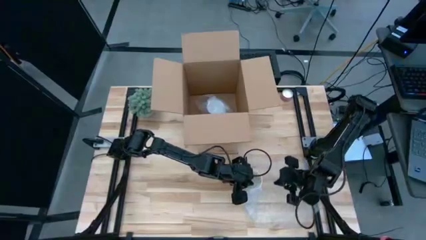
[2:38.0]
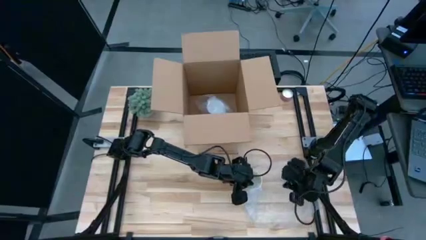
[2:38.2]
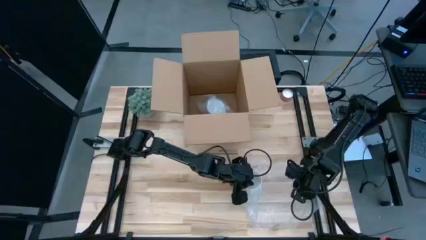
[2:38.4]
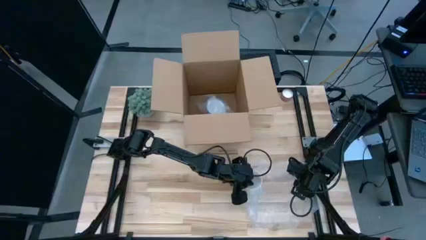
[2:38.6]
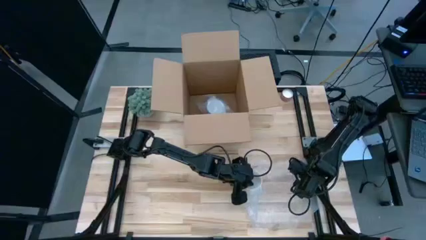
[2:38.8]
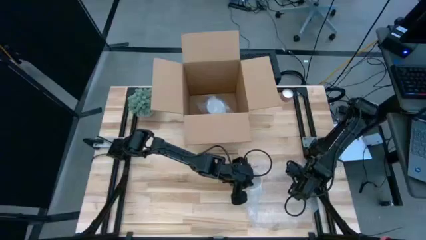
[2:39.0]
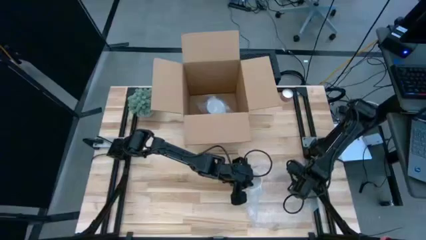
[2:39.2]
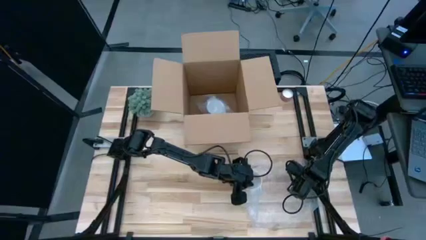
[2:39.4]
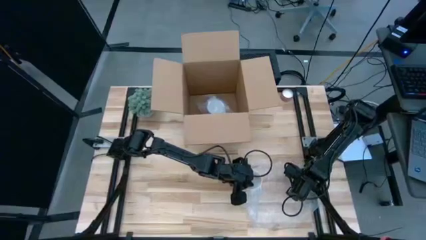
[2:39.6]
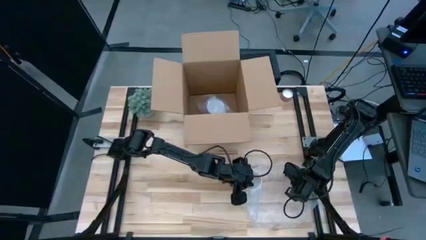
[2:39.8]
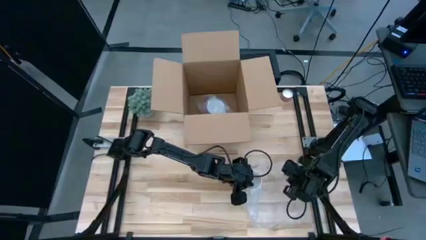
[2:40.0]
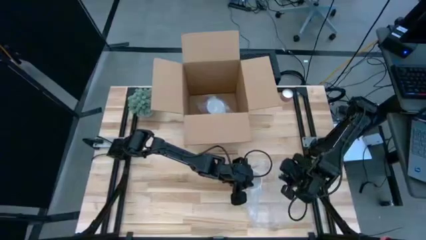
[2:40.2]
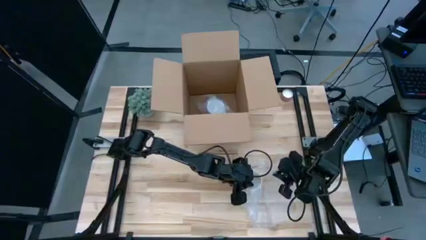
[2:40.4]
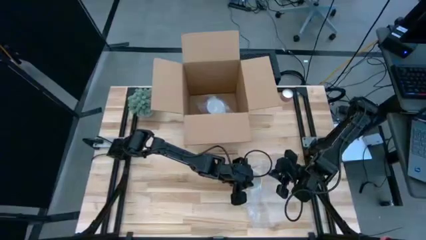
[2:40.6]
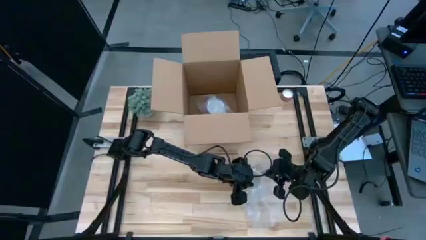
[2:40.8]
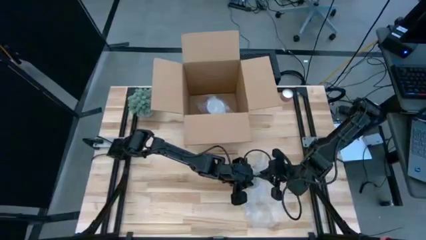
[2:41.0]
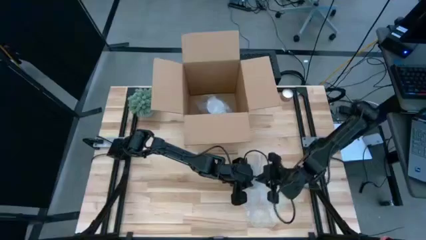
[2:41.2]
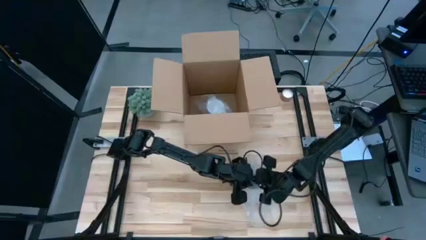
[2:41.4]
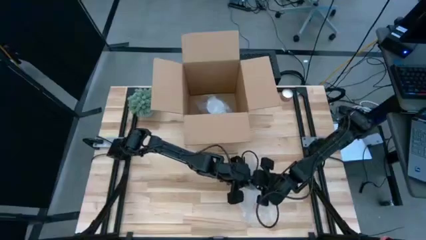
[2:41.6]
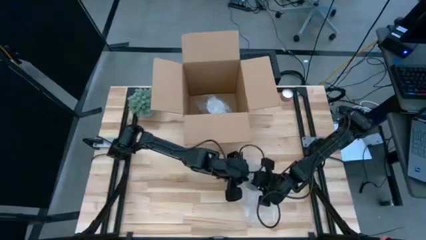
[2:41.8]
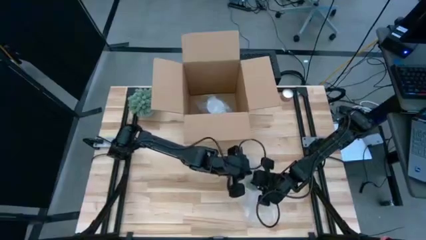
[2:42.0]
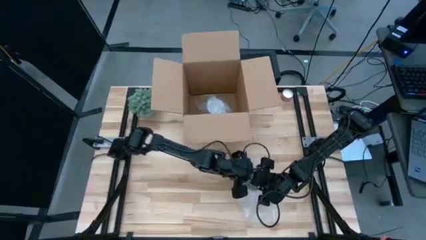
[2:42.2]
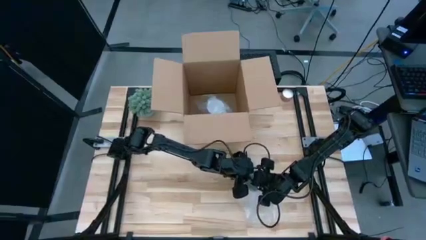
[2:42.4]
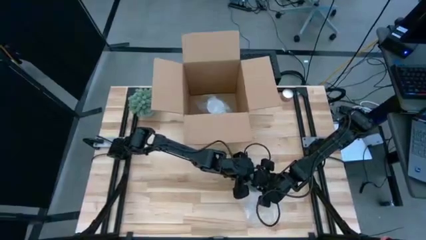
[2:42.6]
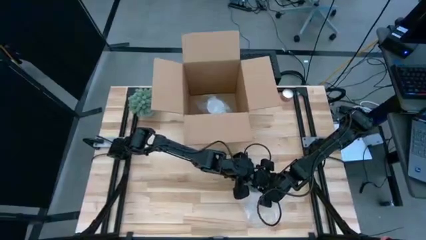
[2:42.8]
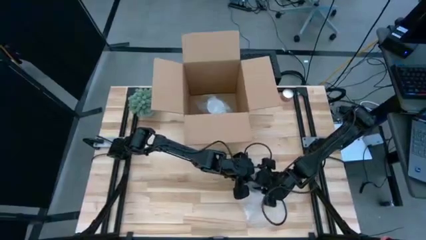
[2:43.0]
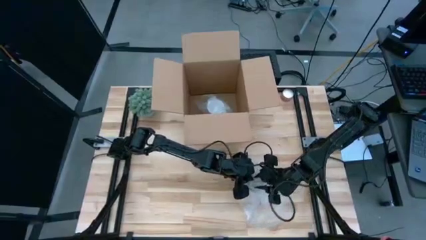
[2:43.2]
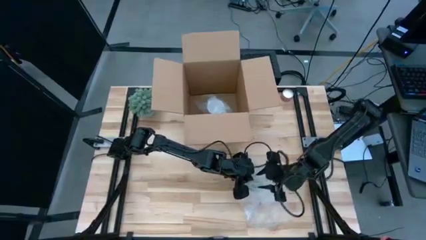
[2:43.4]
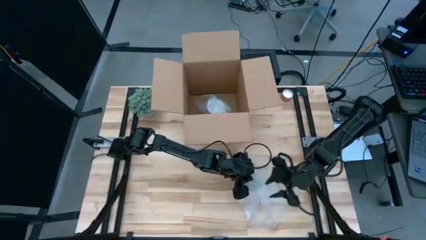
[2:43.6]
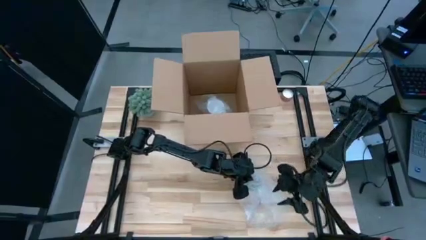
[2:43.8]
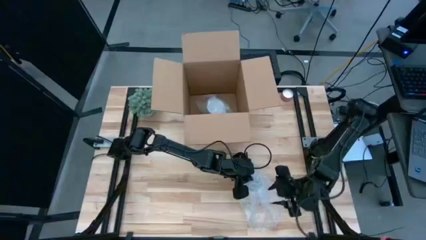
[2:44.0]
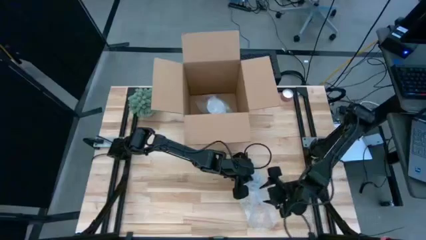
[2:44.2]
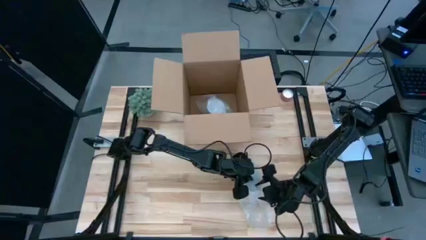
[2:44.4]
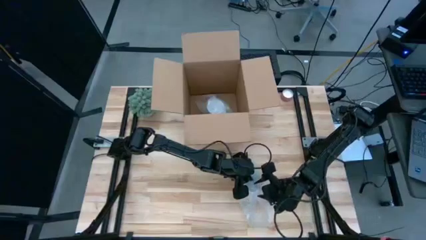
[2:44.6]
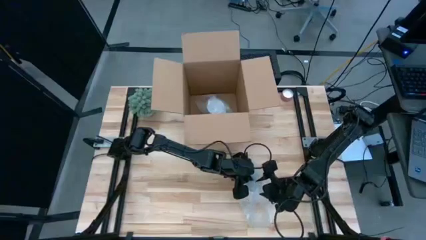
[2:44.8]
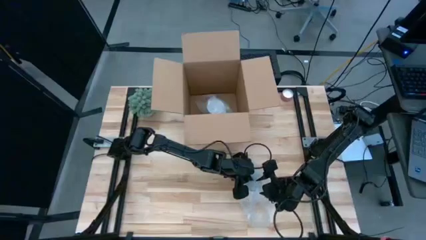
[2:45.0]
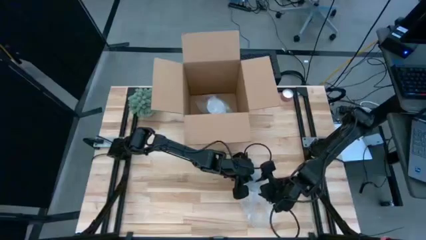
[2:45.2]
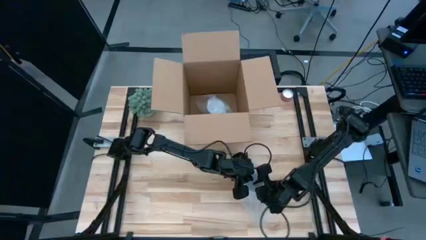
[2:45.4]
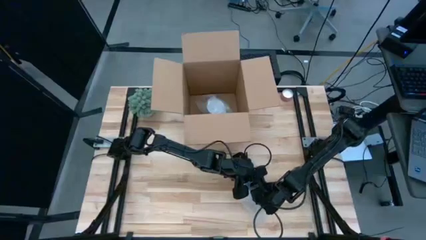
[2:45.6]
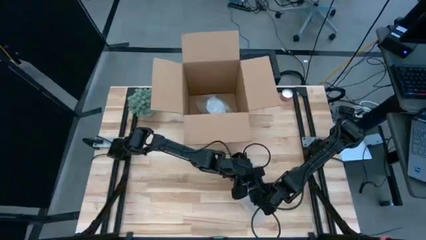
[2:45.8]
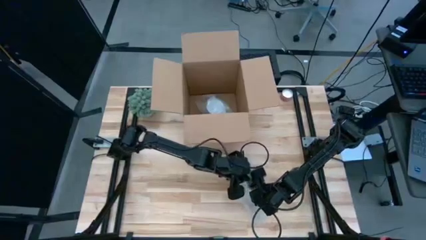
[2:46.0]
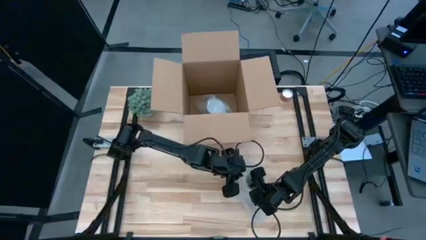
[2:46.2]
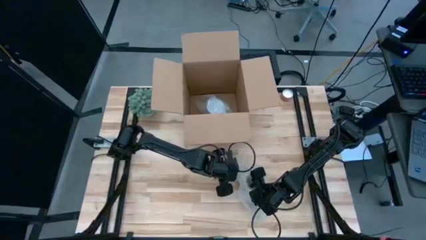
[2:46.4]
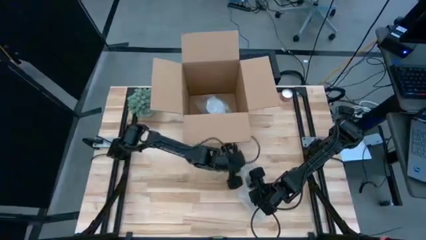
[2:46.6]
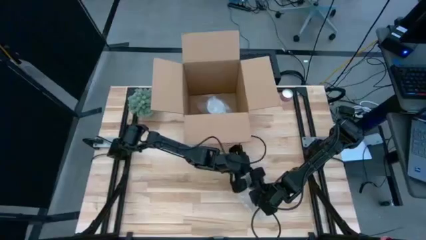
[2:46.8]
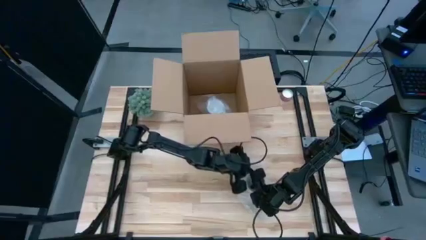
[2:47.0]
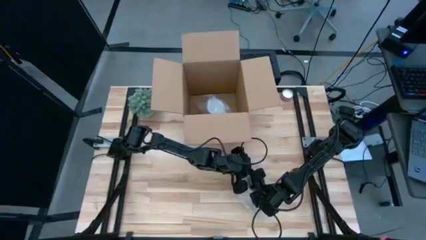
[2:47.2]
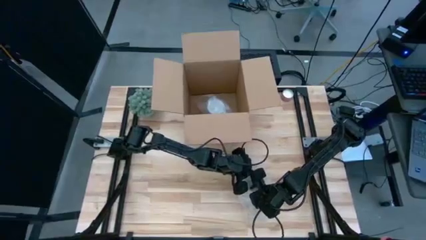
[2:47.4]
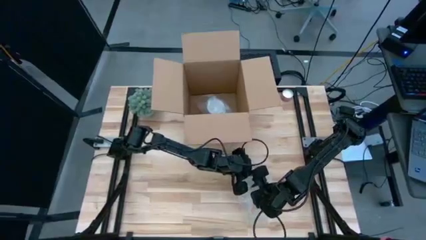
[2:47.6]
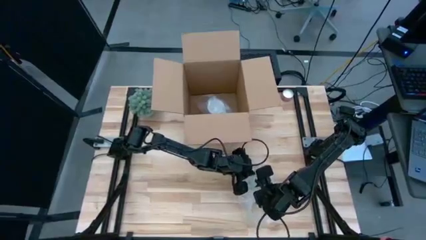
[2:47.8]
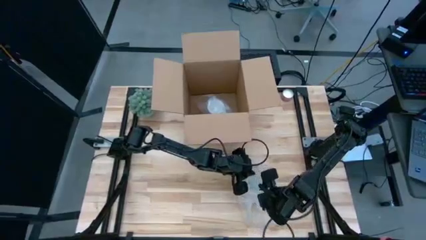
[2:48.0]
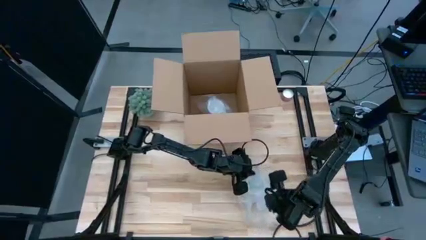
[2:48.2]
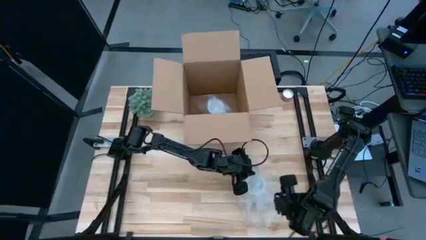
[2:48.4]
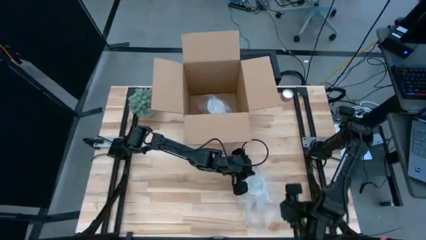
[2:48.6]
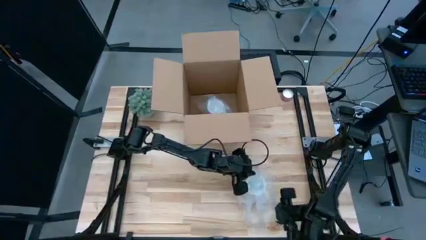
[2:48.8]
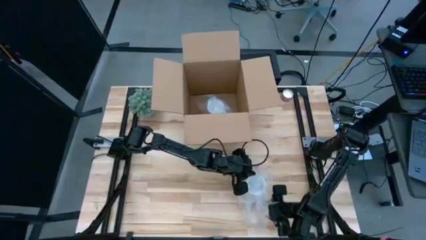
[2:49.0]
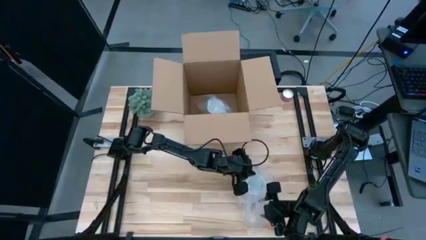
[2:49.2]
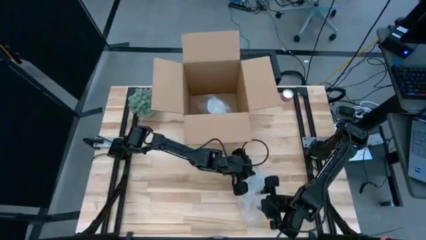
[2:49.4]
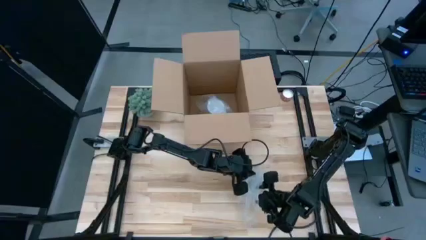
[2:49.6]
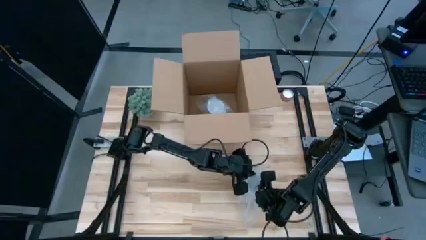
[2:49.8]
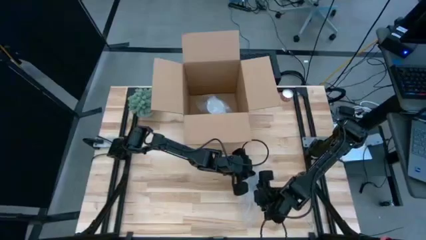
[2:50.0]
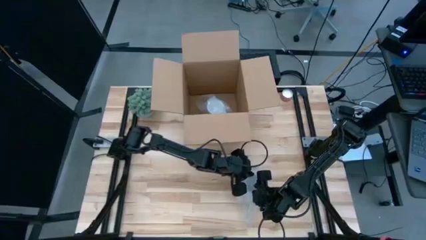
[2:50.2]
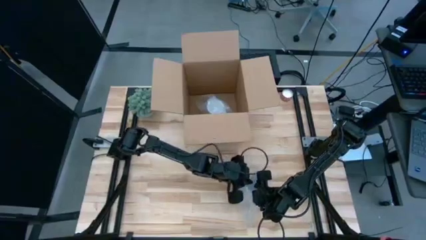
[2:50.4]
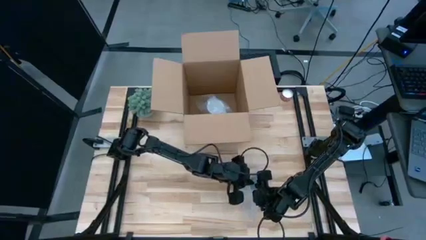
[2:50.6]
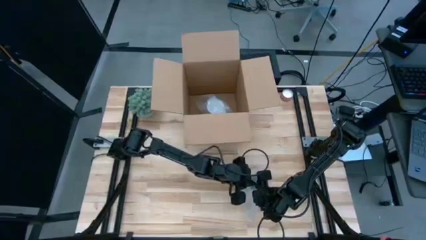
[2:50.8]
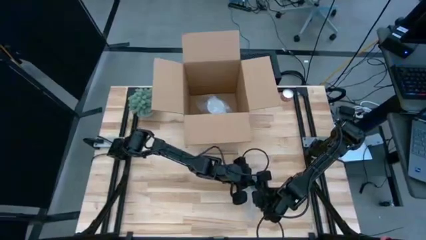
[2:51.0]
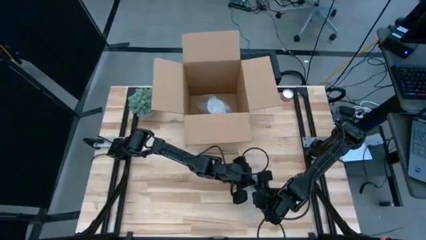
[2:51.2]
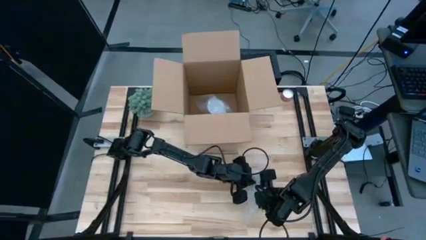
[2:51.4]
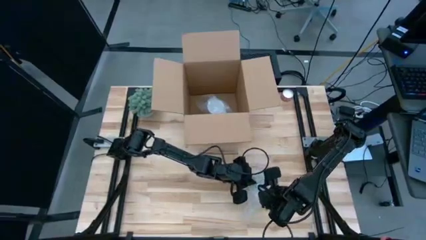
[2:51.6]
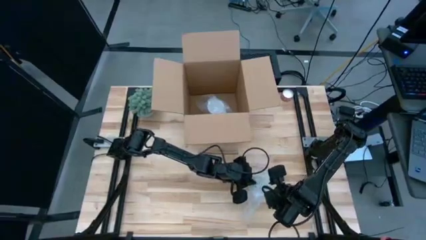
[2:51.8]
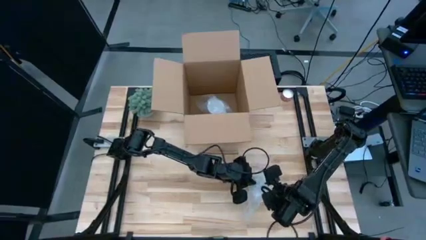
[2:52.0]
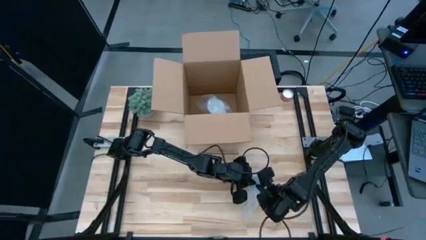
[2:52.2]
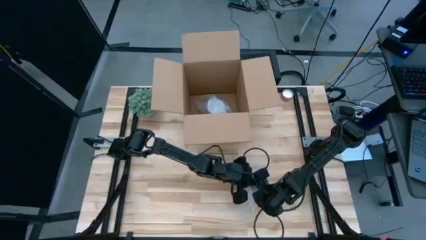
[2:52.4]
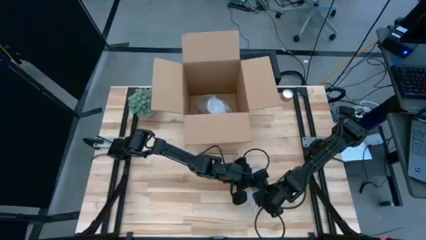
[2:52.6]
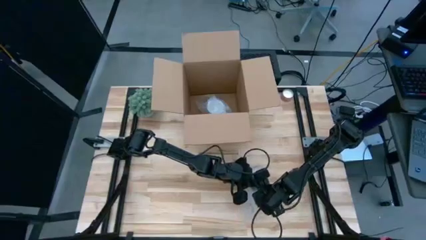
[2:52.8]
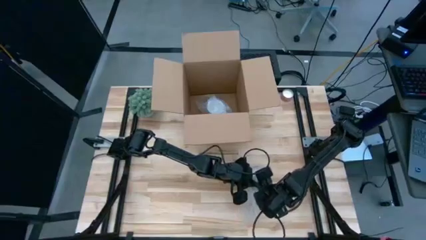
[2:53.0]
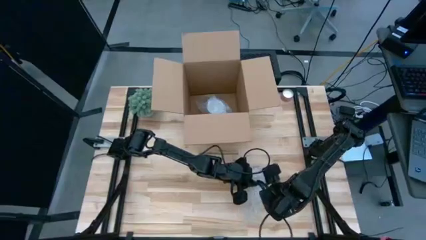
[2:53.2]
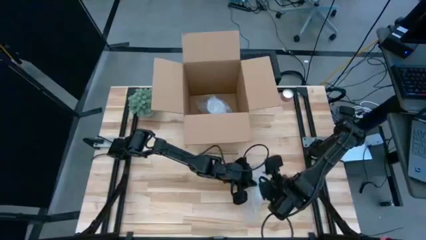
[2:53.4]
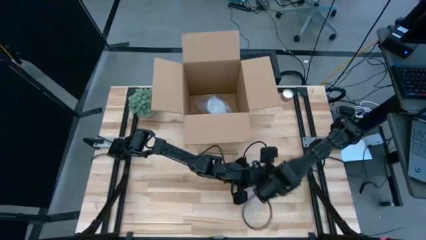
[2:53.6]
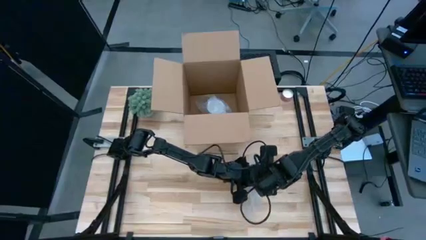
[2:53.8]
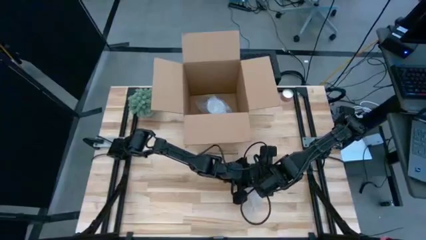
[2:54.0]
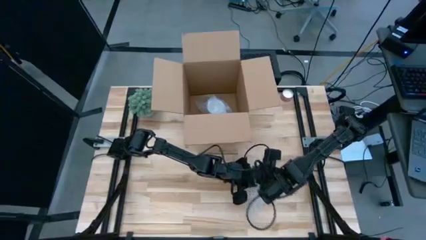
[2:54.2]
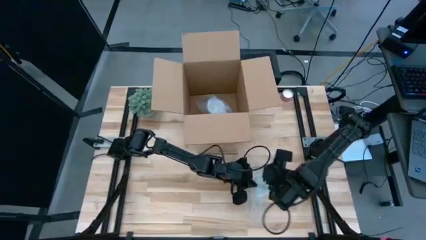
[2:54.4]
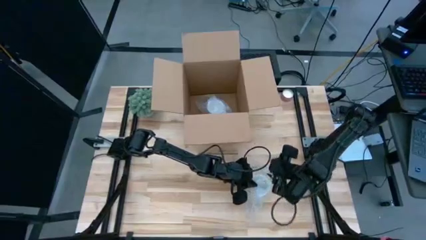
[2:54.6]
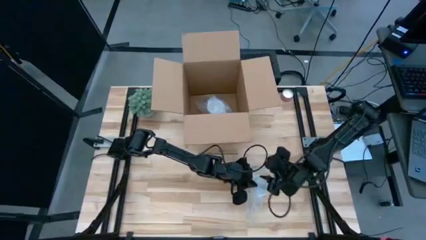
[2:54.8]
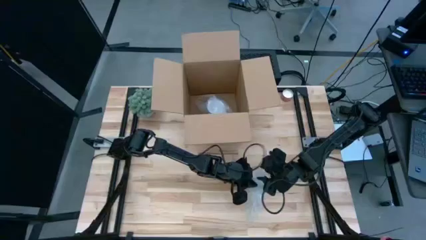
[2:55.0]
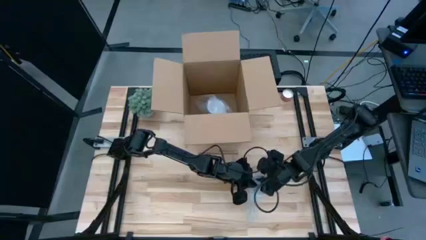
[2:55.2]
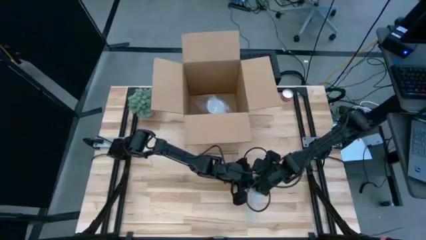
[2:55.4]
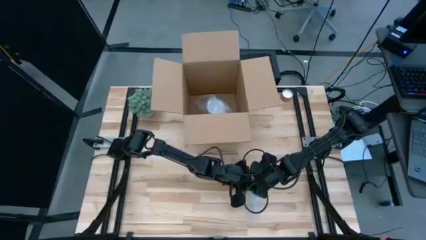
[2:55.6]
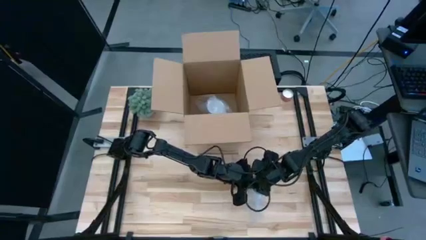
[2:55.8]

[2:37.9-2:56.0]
Task: wrap mug
Wrap the orange mug in the bubble wrap
